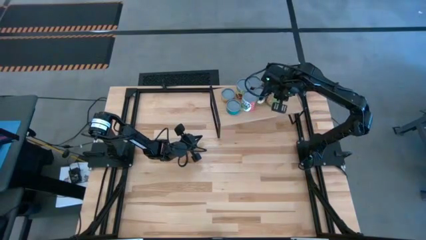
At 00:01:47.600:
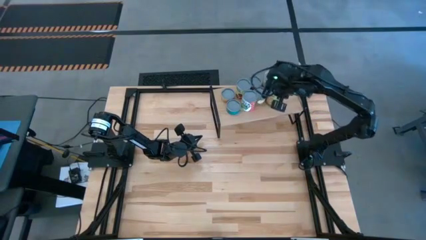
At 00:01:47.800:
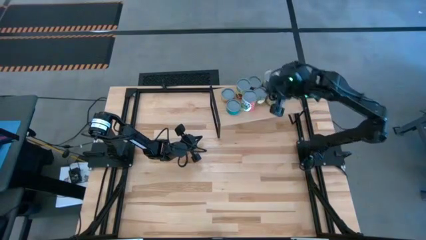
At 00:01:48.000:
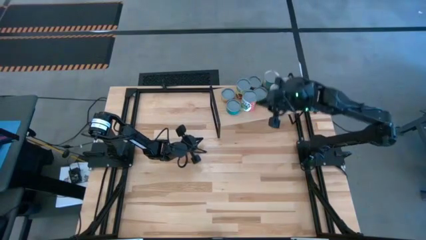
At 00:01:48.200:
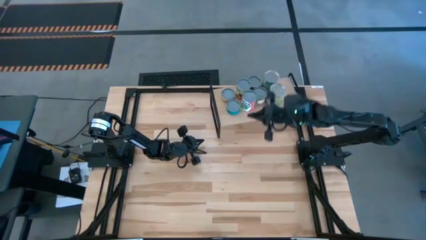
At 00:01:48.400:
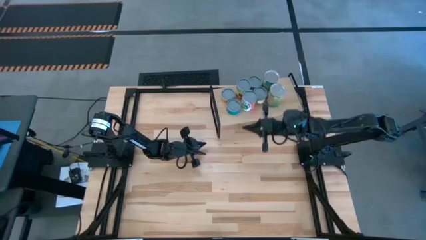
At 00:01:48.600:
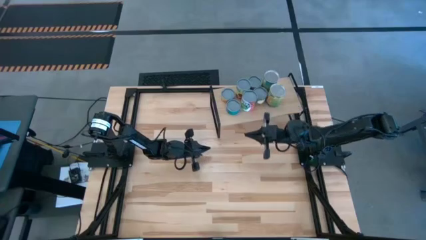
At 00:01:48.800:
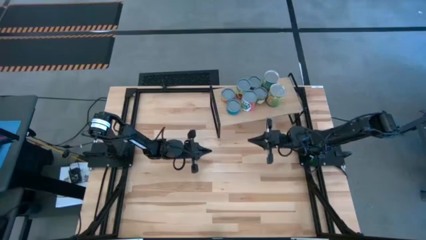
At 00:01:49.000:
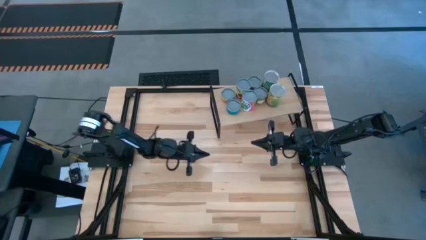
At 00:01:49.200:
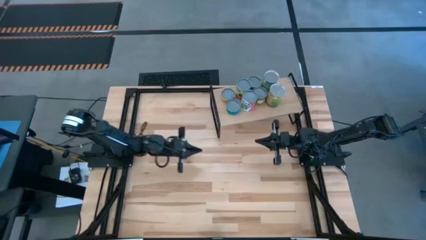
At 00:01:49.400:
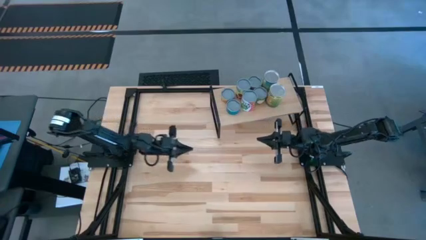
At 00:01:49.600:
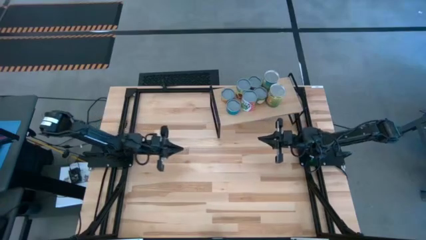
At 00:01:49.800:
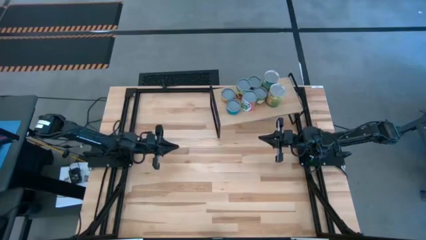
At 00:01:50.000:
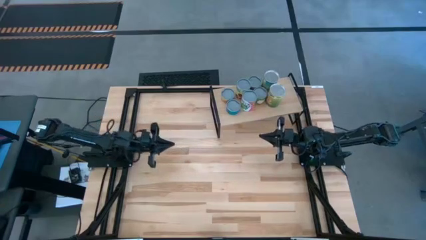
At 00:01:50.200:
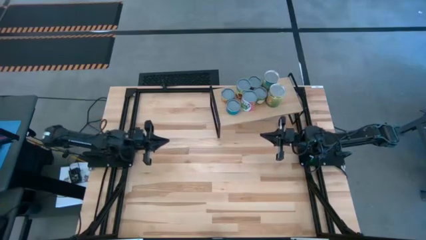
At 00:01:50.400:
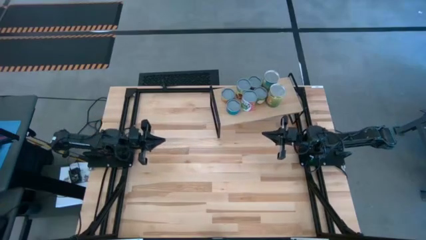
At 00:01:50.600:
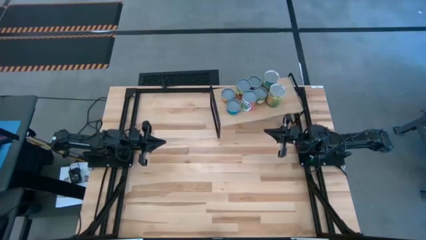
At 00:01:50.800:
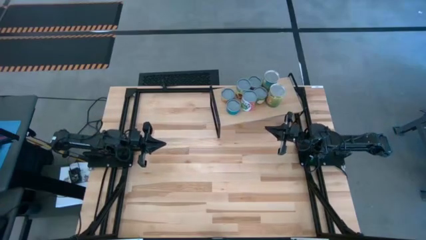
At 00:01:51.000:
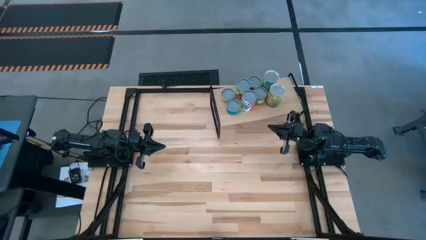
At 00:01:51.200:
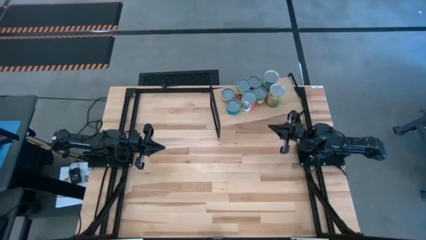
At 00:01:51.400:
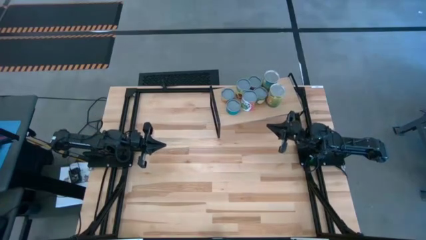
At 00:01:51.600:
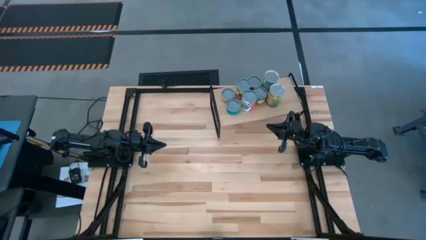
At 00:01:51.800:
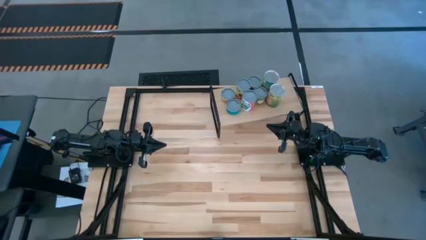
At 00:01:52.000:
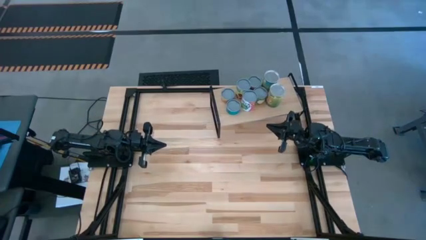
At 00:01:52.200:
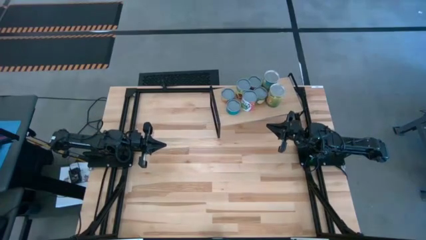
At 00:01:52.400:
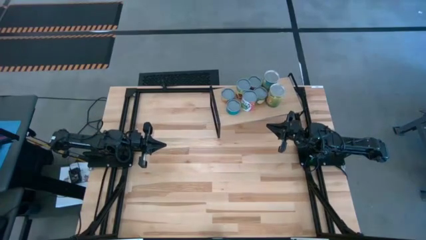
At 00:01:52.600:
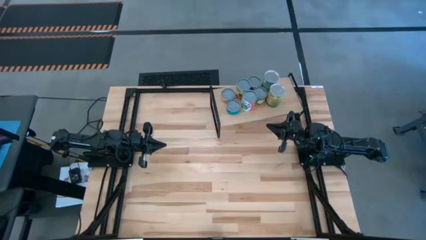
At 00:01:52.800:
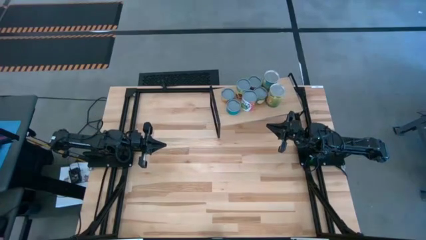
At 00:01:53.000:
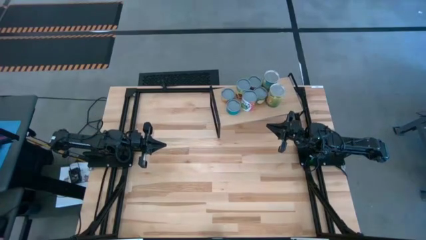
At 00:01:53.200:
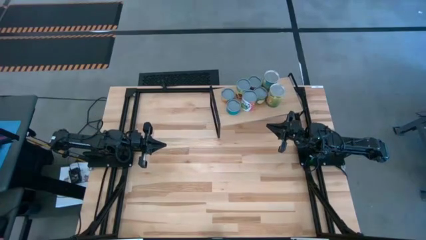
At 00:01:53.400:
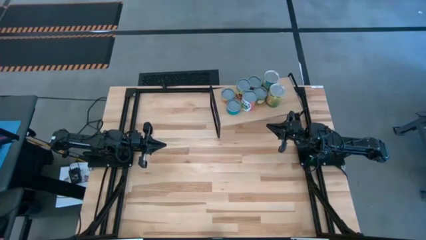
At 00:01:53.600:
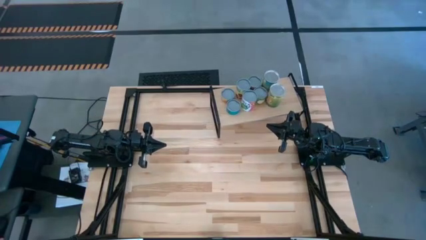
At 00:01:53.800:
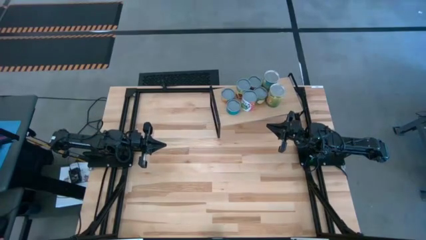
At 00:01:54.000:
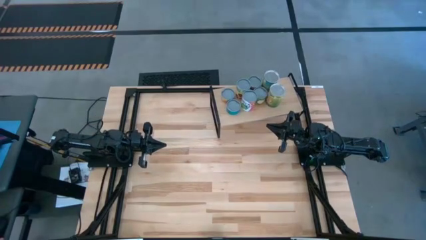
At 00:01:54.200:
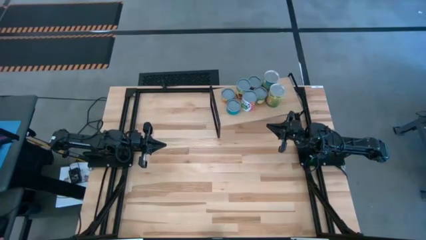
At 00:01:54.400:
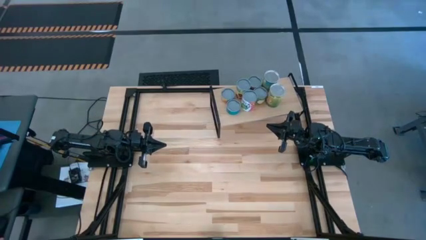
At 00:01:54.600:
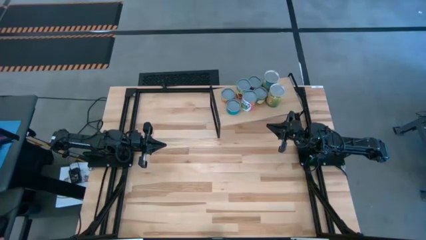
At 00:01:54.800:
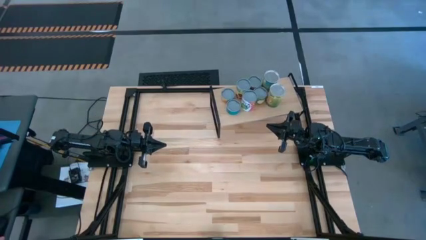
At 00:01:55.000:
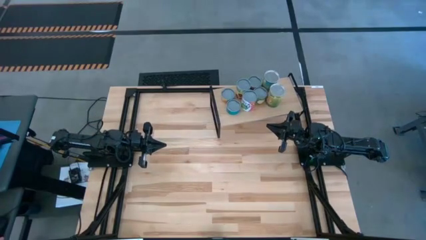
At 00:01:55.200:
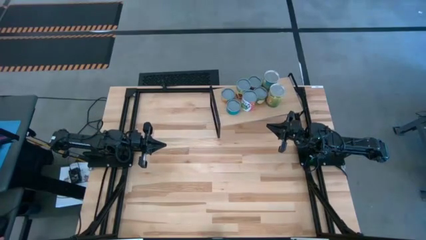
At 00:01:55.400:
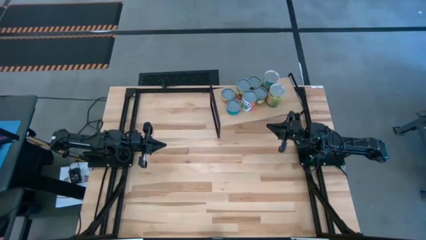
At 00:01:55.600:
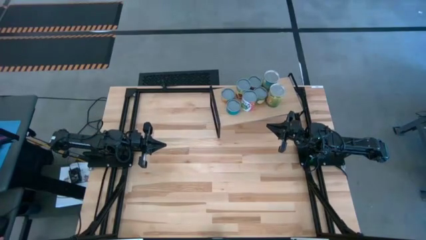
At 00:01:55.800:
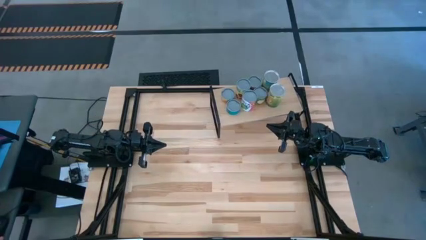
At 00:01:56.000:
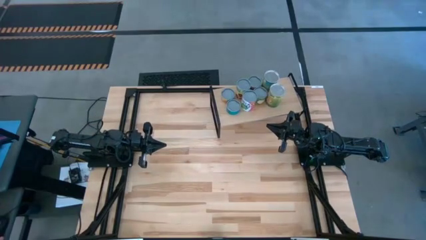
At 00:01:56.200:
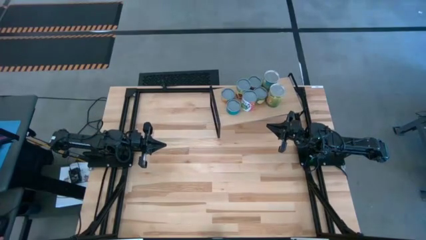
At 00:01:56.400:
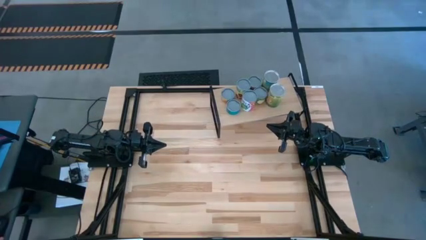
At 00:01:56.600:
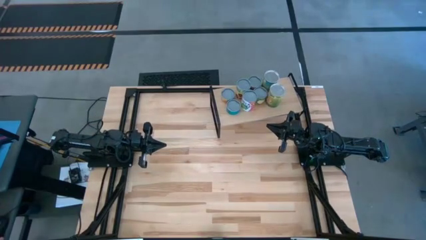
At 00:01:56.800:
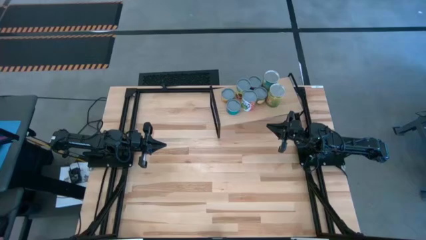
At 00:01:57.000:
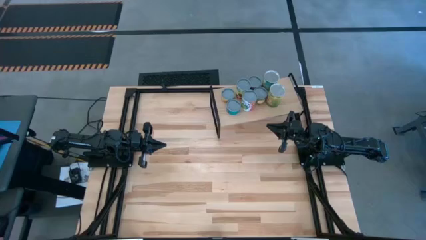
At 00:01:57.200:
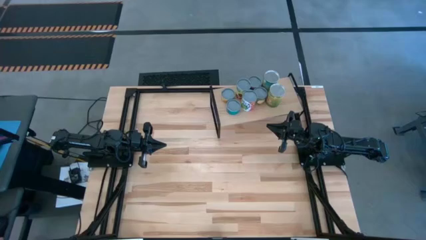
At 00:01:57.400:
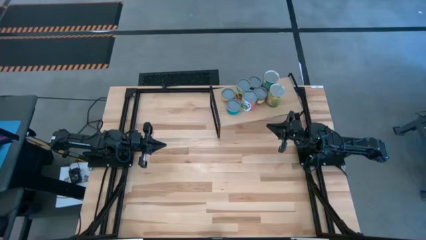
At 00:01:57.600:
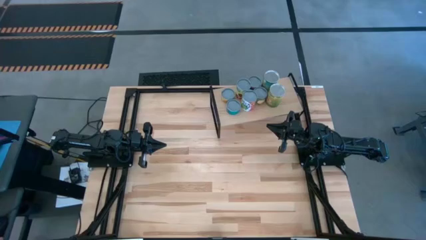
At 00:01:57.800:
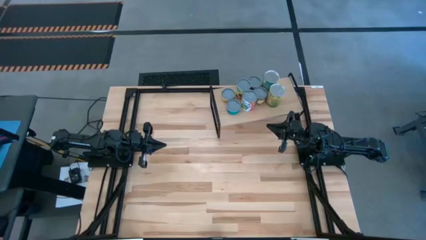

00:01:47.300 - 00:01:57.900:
Task: Pick and place cans onto a shelf
Return to Home Position
